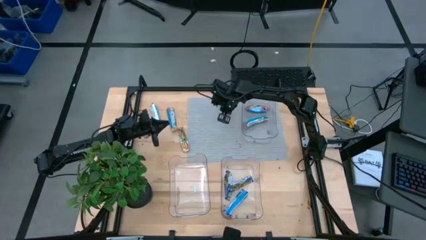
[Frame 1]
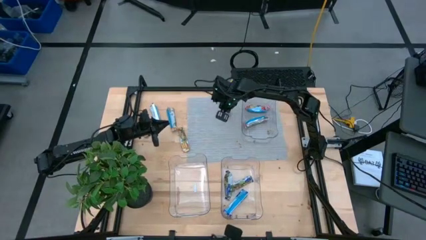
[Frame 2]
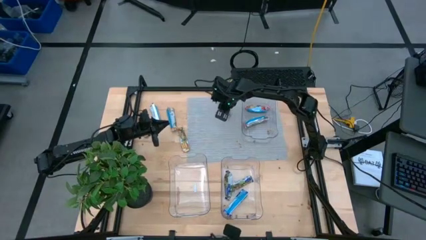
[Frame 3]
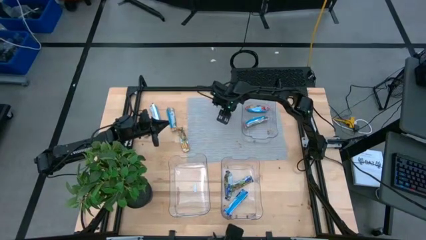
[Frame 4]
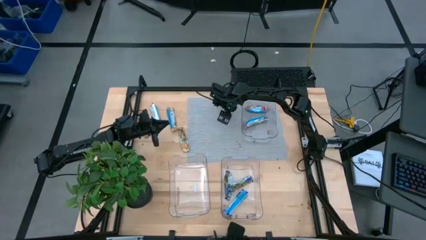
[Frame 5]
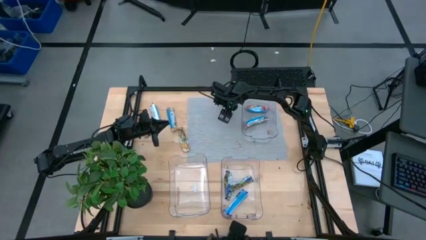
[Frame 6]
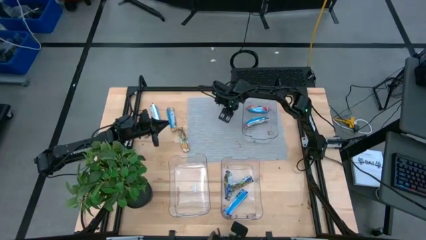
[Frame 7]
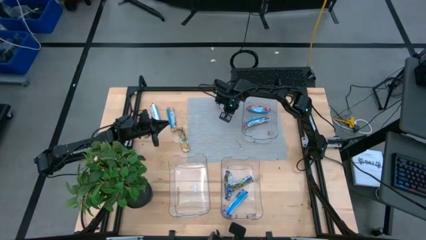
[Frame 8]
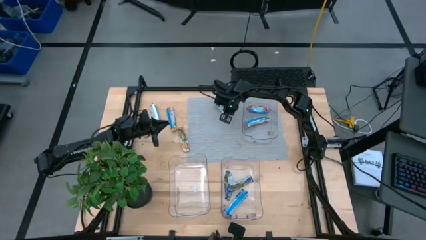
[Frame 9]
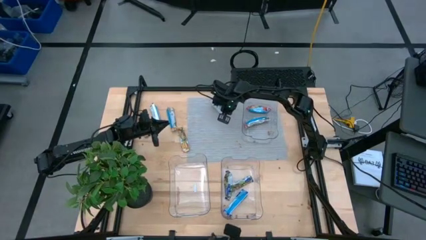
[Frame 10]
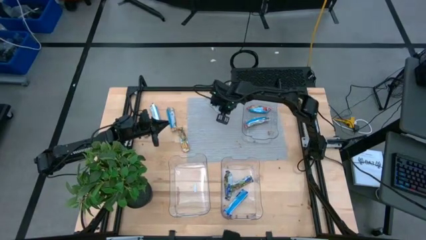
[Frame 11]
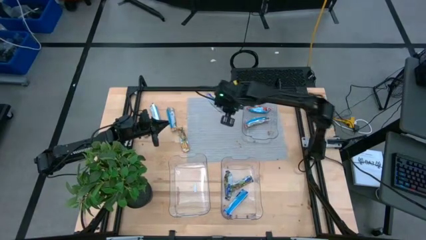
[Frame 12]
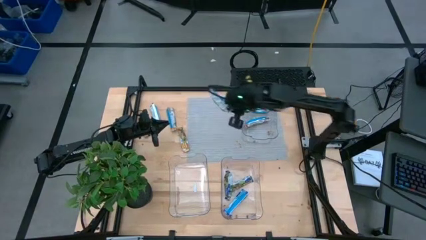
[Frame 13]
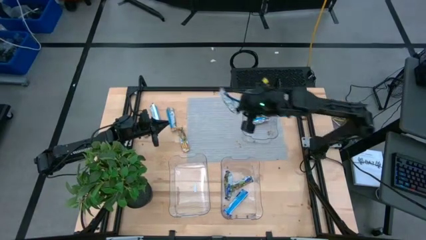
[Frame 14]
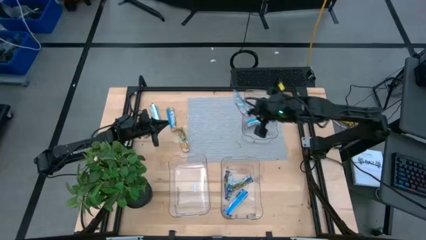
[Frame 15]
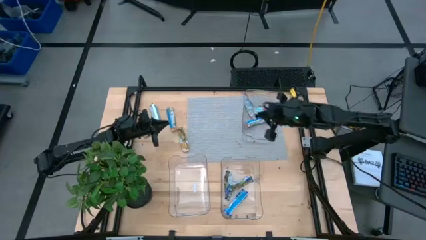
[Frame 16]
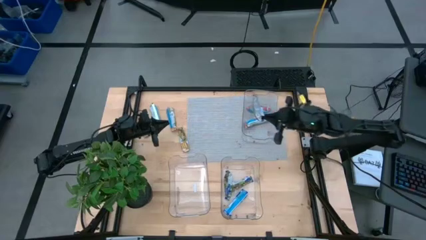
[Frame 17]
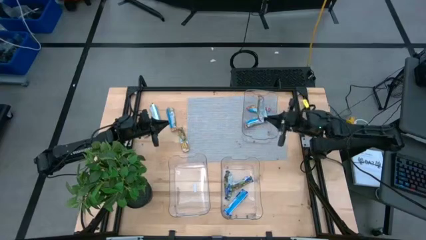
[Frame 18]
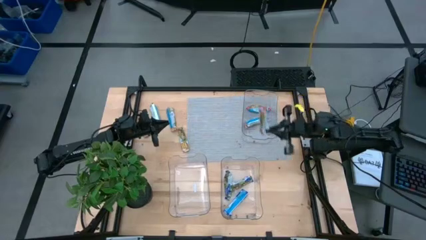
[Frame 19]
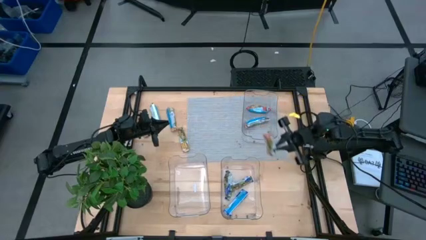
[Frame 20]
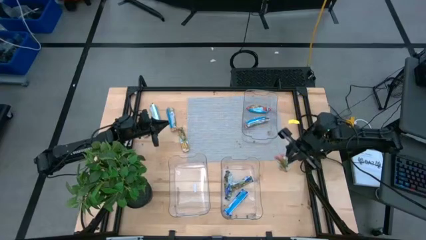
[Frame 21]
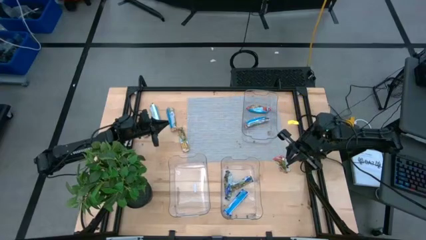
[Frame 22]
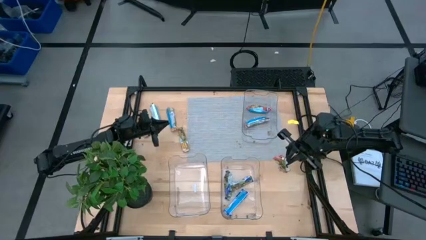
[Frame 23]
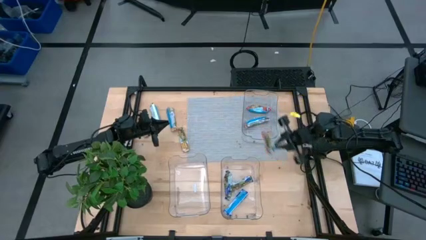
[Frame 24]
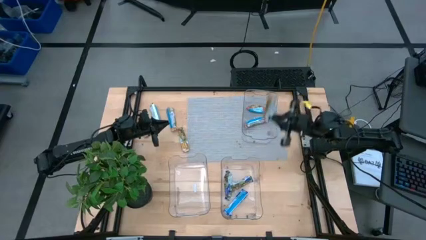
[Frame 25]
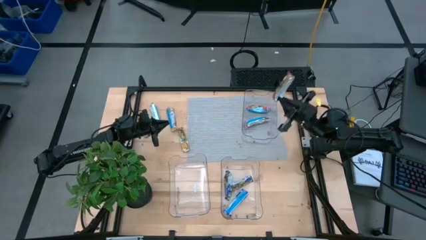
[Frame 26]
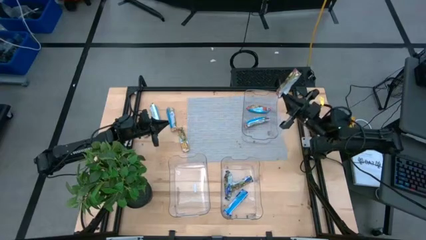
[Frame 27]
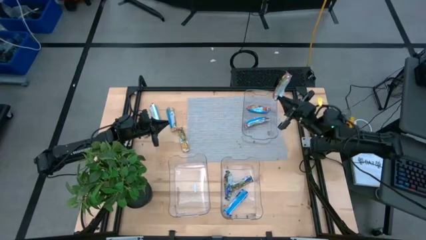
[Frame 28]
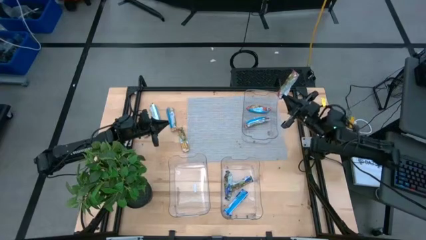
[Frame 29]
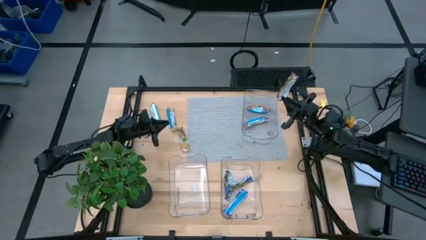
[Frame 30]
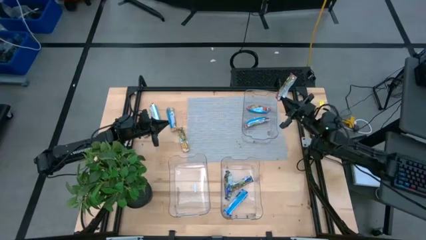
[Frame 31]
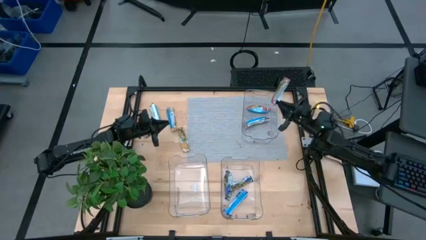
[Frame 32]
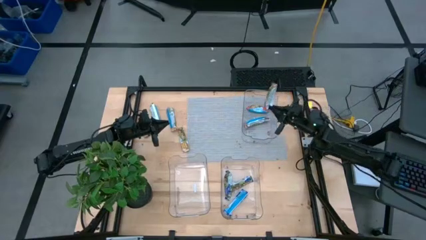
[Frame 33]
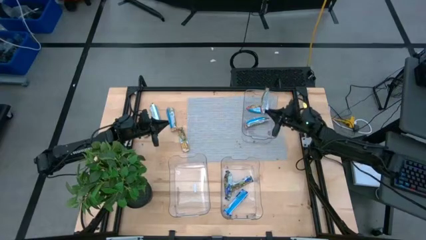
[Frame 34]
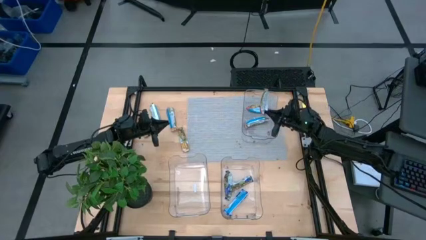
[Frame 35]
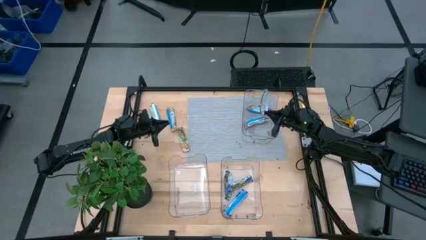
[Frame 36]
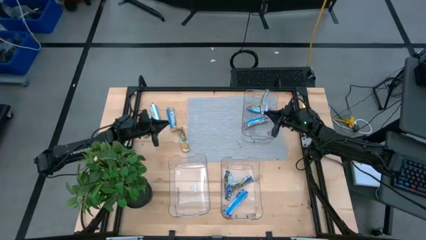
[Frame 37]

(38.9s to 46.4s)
Task: Pick and place Granola Bars by type
Put the red granola bar into the top transparent bin

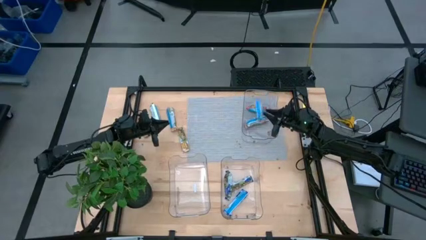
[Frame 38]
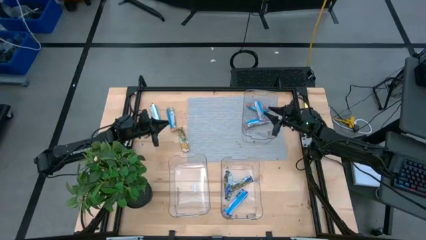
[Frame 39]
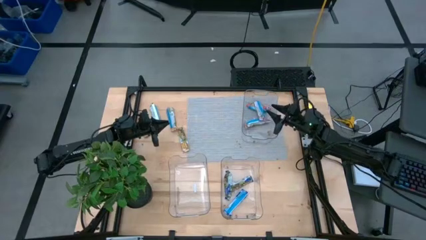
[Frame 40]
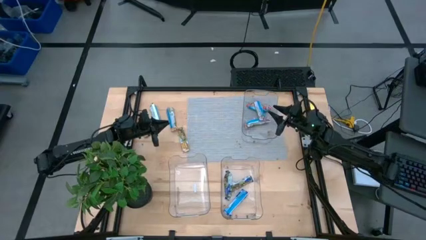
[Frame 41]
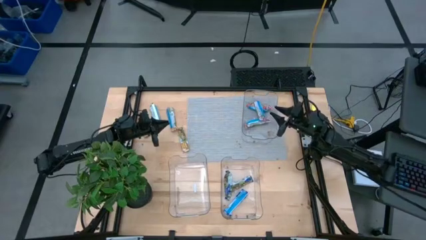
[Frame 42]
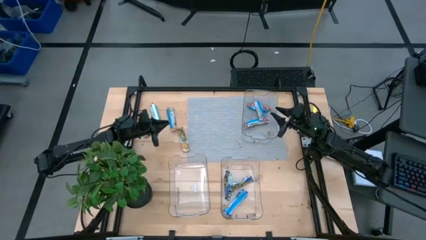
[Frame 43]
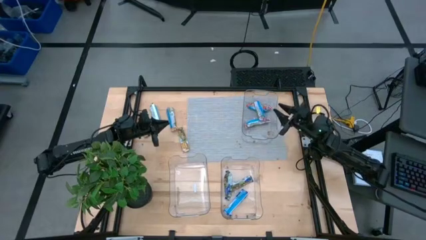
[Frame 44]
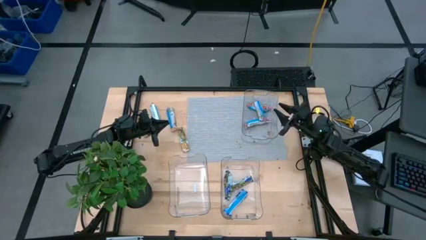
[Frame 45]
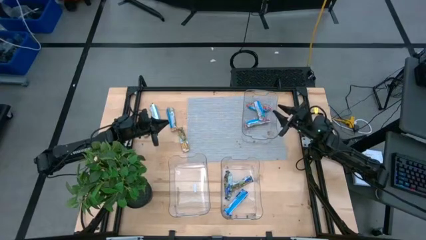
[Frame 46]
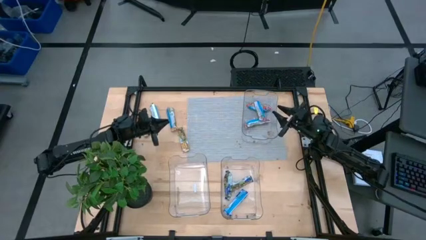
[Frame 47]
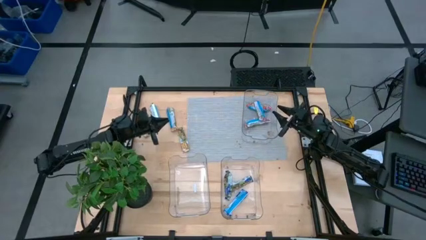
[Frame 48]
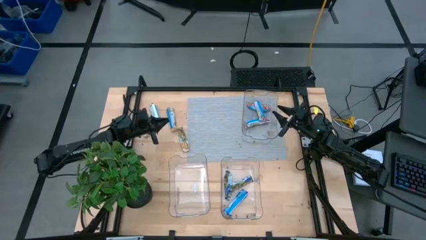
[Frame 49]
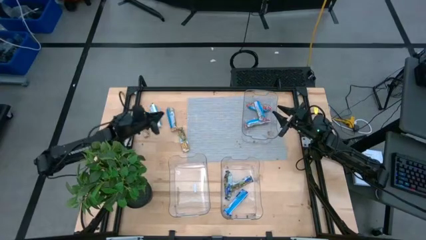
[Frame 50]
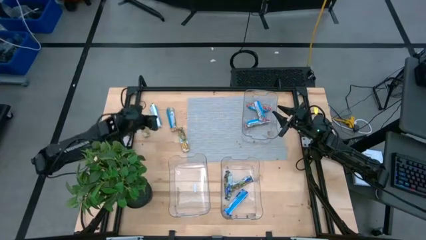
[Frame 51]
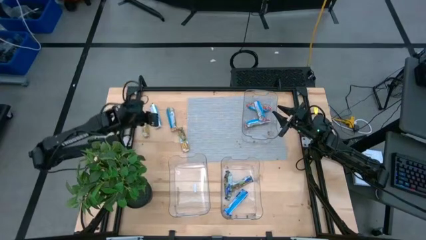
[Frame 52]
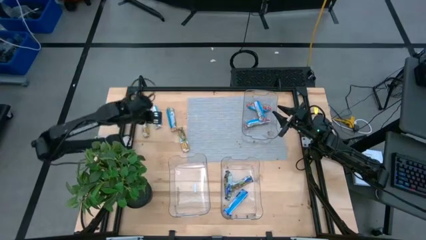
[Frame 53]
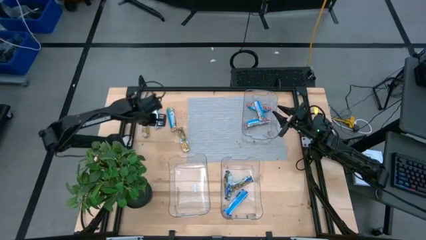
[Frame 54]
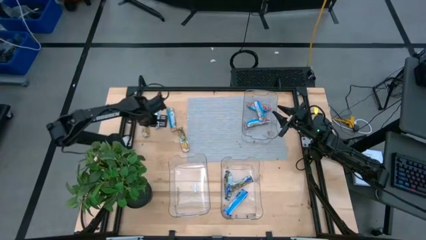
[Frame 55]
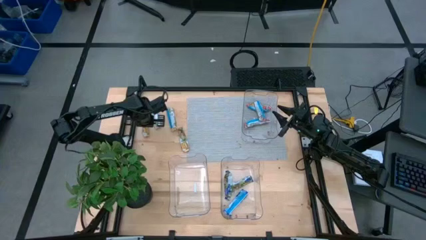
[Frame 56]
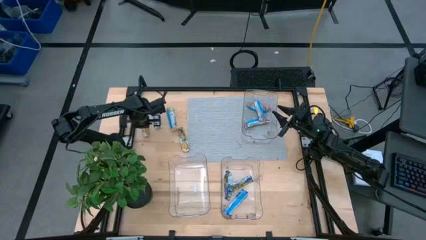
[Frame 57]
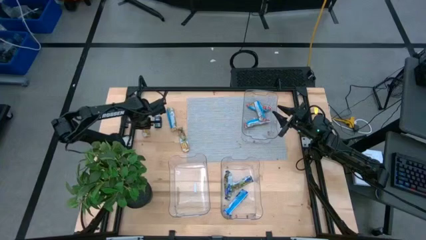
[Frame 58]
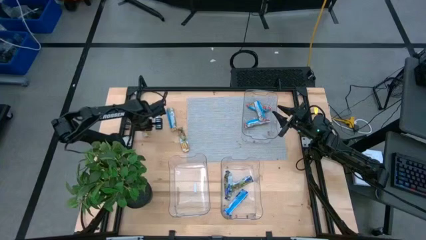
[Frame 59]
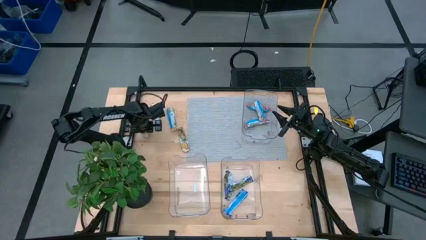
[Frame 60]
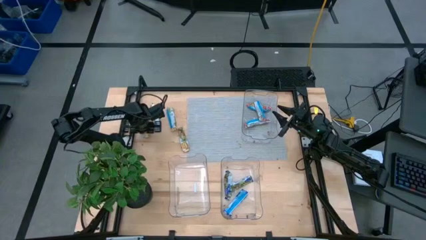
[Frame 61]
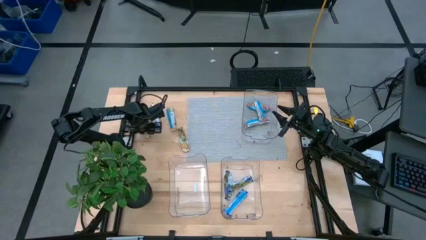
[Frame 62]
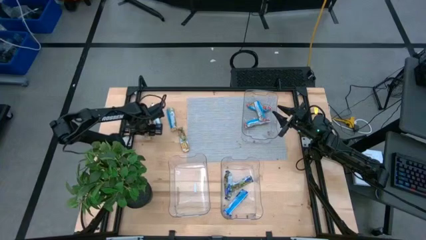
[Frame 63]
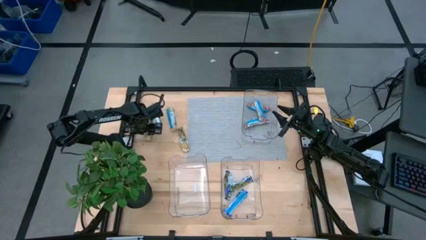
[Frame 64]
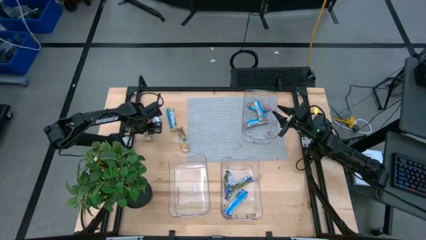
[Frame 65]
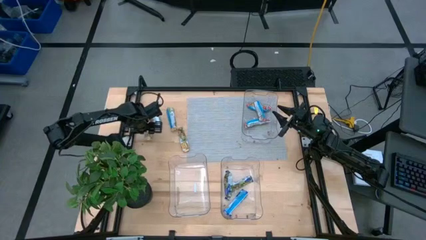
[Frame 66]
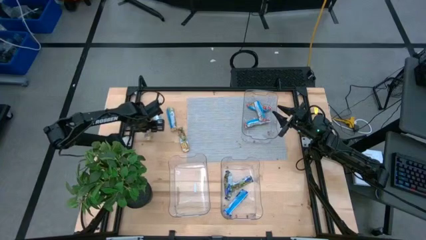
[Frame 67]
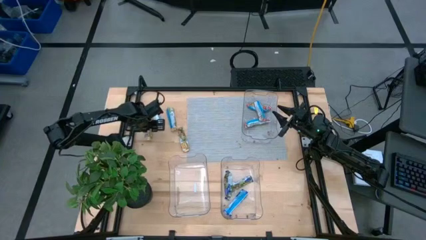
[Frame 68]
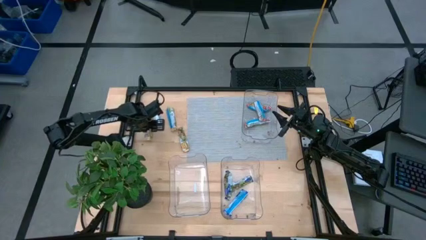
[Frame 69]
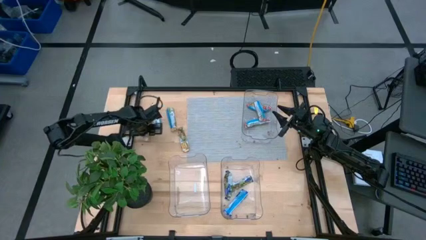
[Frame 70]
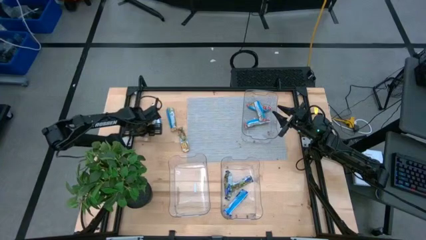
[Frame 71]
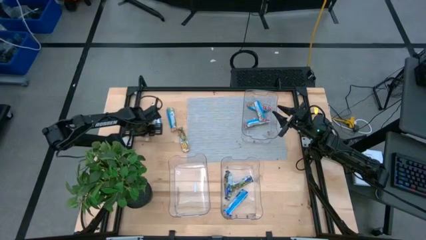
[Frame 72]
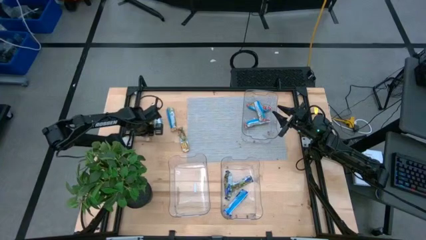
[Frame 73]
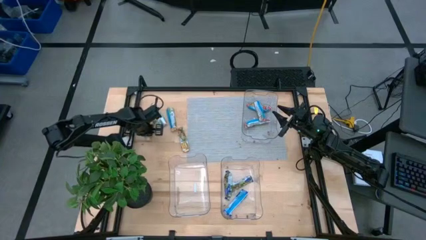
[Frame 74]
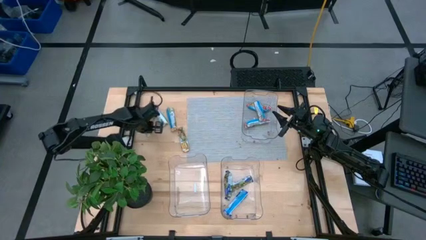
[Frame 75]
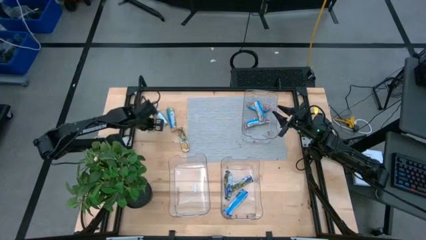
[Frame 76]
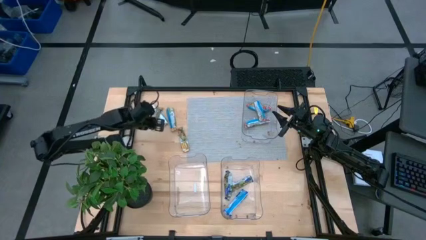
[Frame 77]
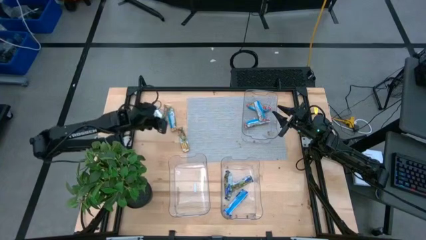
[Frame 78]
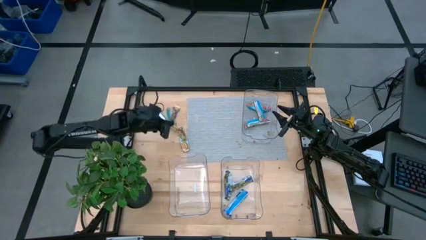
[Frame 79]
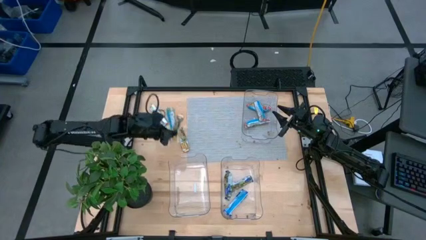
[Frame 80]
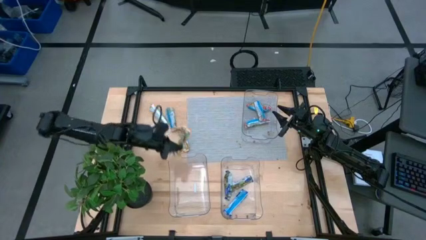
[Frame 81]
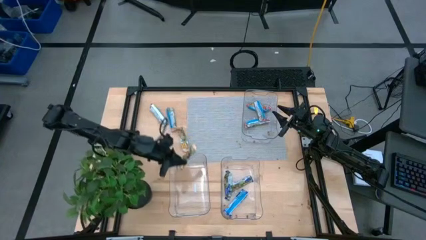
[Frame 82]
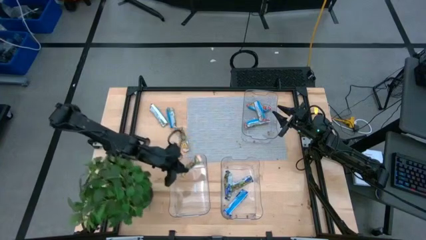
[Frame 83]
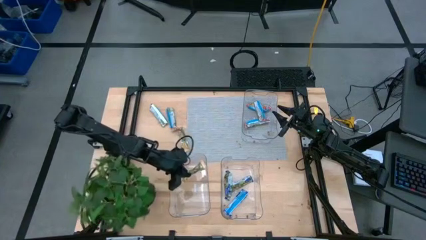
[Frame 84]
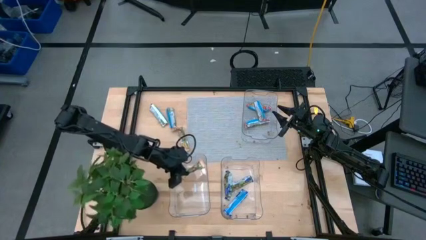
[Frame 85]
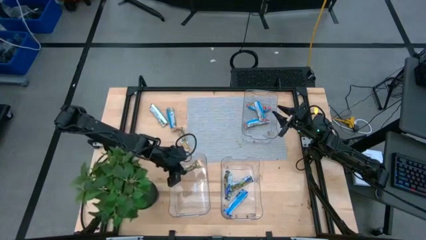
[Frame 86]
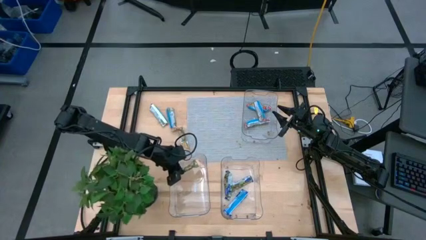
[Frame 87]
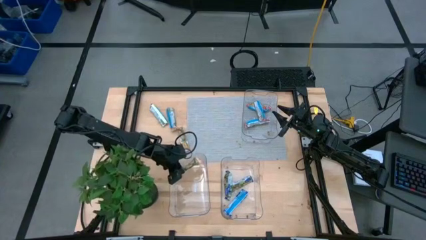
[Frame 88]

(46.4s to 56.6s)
Put the left yellow granola bar into the bottom left transparent bin
